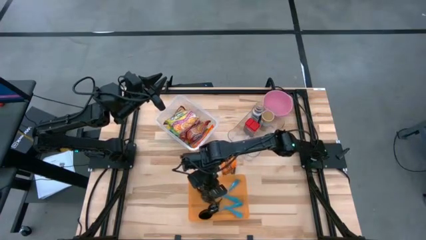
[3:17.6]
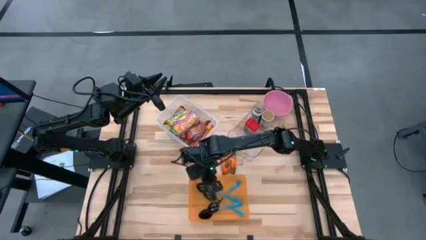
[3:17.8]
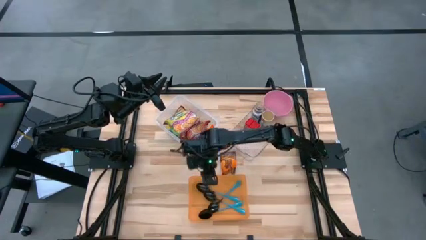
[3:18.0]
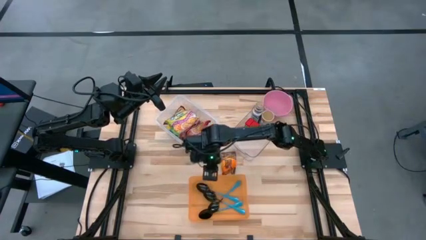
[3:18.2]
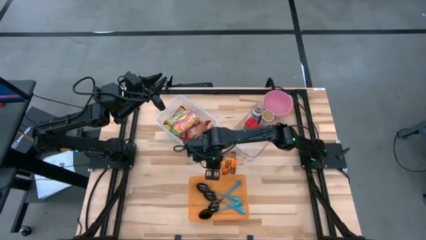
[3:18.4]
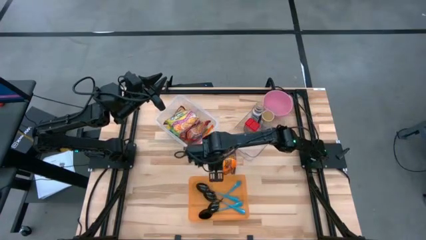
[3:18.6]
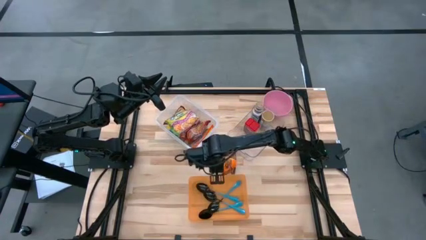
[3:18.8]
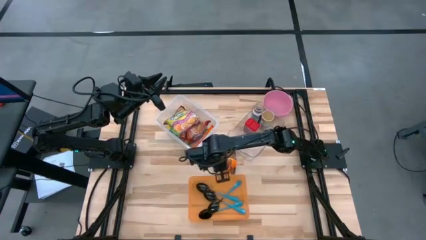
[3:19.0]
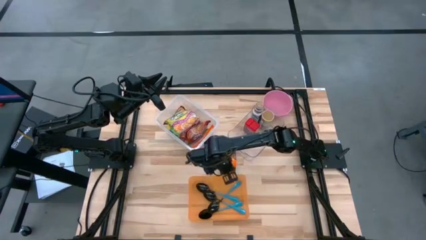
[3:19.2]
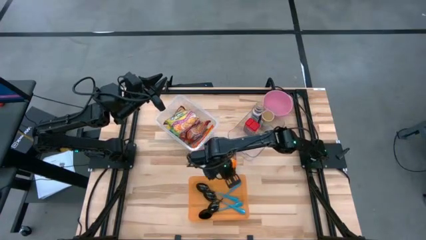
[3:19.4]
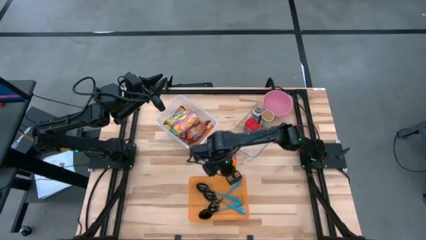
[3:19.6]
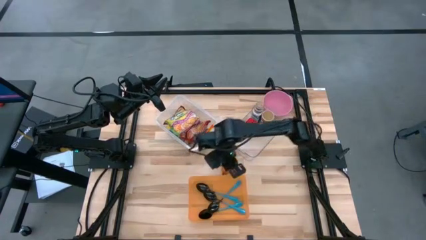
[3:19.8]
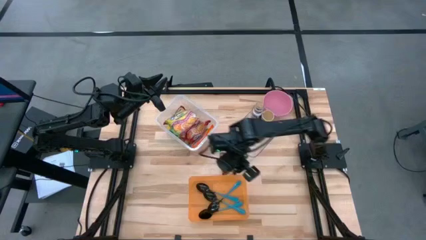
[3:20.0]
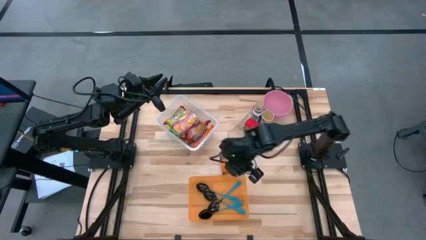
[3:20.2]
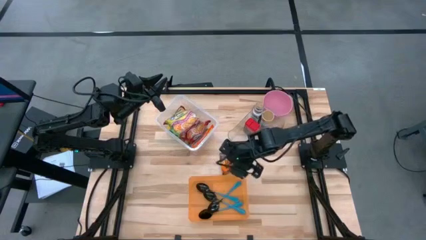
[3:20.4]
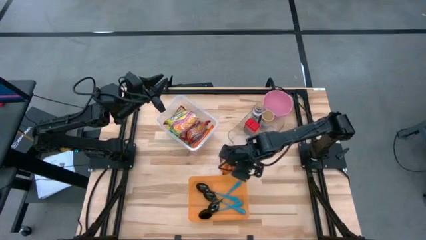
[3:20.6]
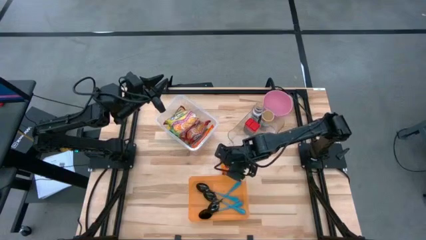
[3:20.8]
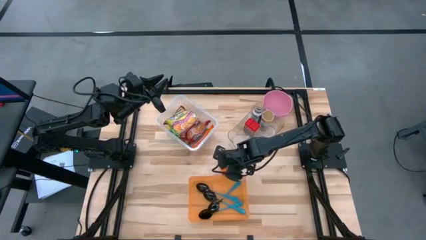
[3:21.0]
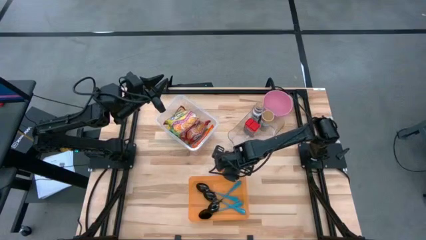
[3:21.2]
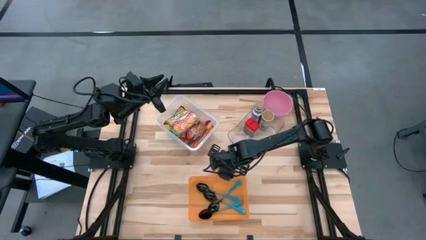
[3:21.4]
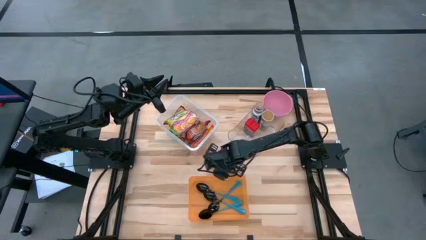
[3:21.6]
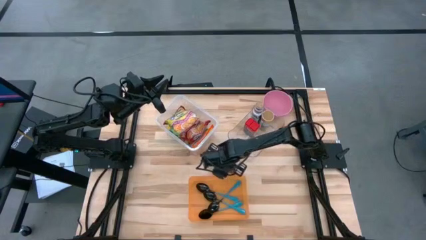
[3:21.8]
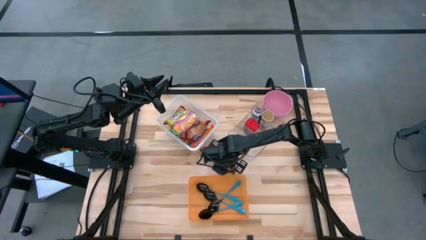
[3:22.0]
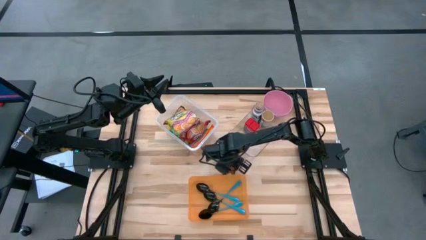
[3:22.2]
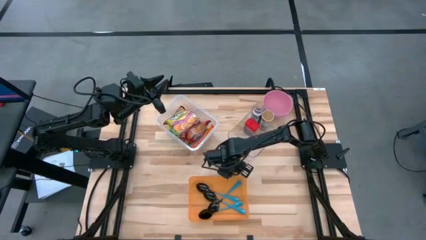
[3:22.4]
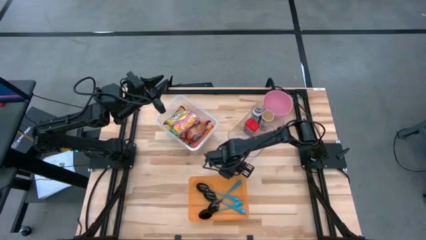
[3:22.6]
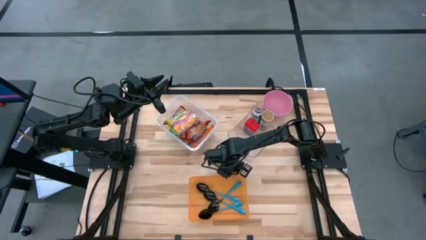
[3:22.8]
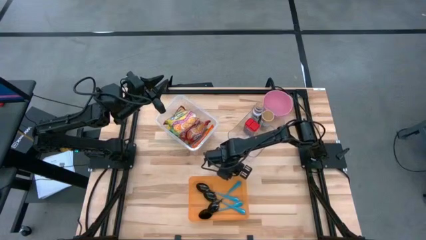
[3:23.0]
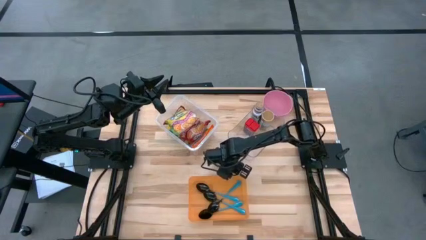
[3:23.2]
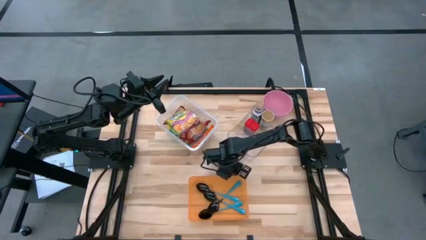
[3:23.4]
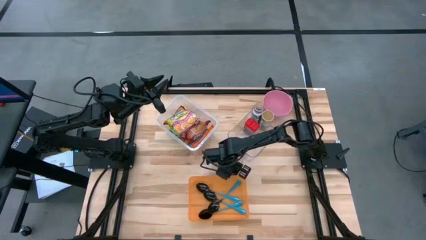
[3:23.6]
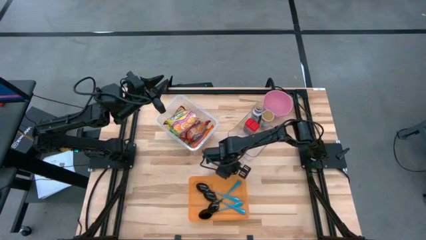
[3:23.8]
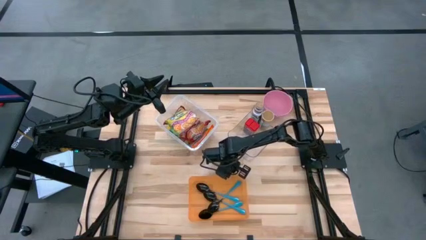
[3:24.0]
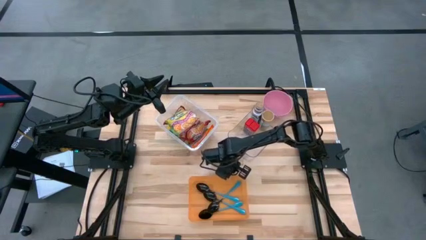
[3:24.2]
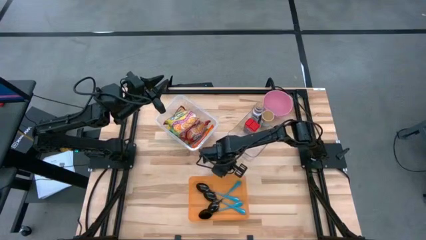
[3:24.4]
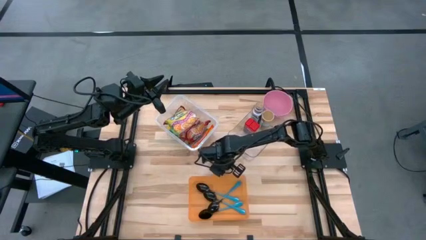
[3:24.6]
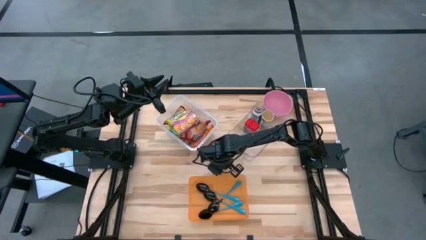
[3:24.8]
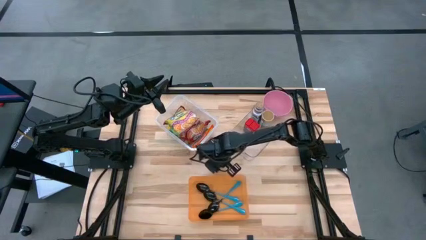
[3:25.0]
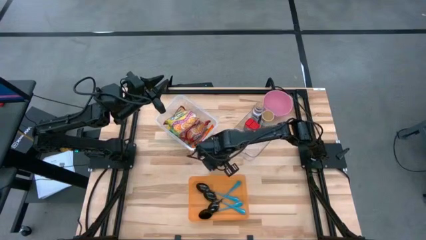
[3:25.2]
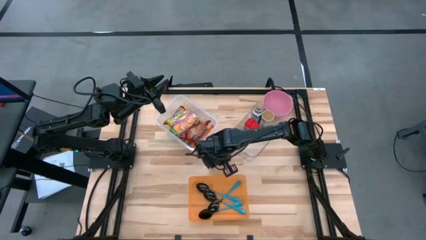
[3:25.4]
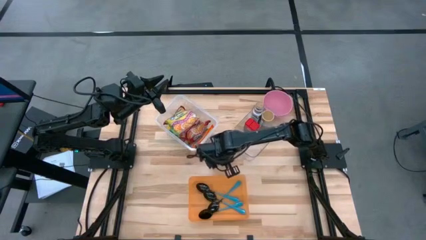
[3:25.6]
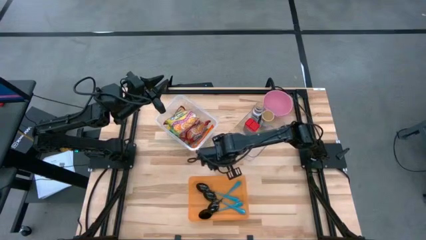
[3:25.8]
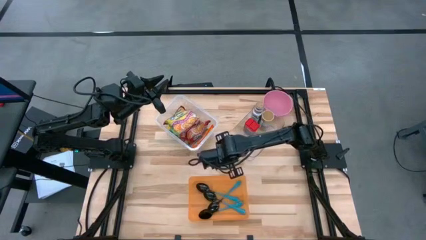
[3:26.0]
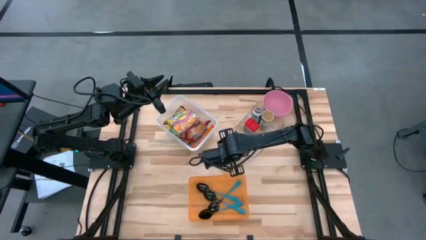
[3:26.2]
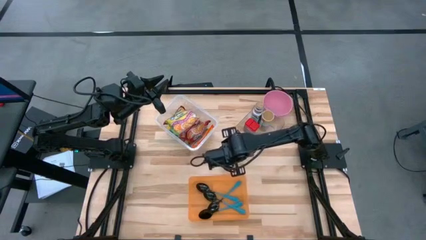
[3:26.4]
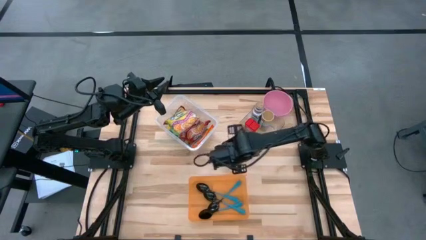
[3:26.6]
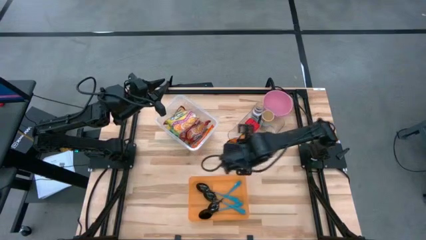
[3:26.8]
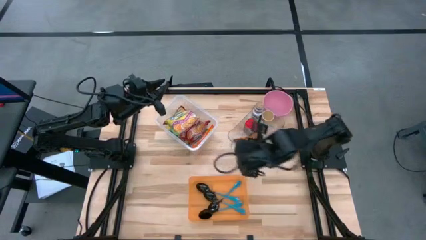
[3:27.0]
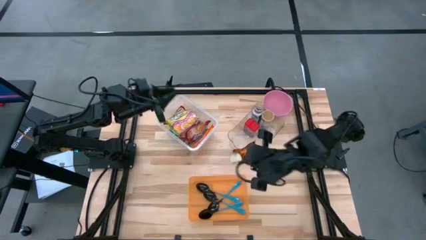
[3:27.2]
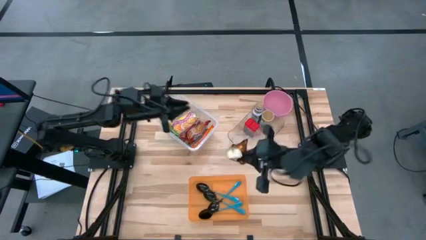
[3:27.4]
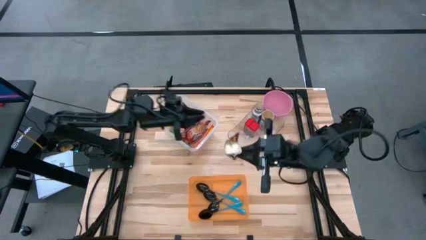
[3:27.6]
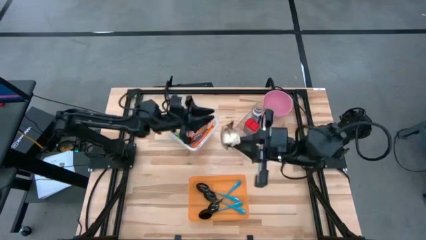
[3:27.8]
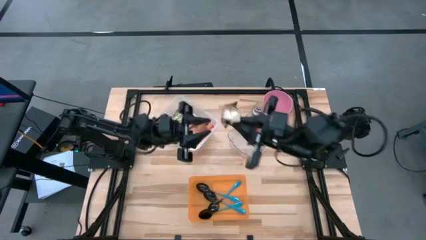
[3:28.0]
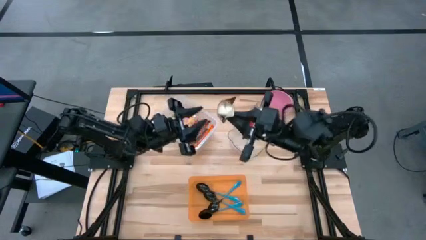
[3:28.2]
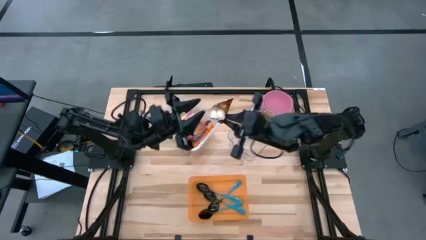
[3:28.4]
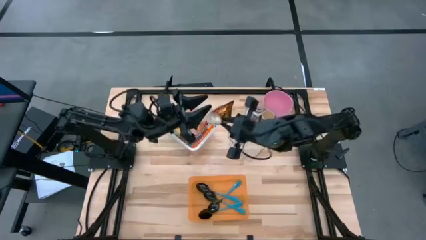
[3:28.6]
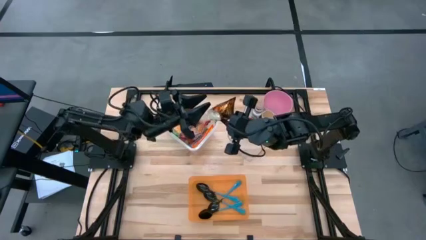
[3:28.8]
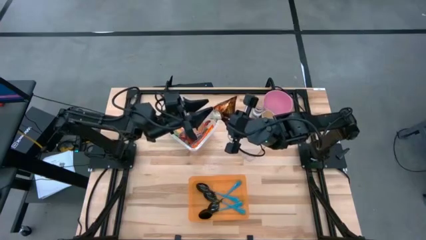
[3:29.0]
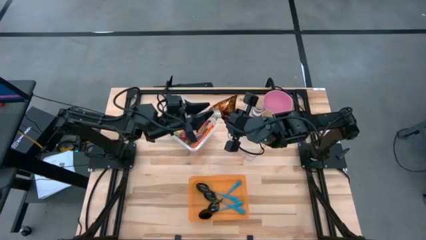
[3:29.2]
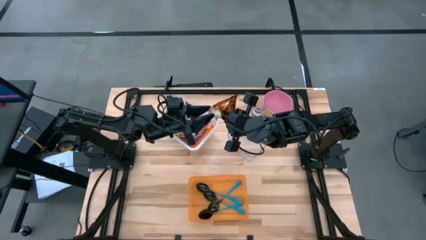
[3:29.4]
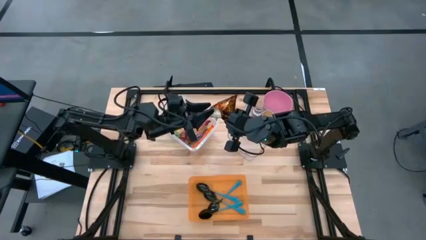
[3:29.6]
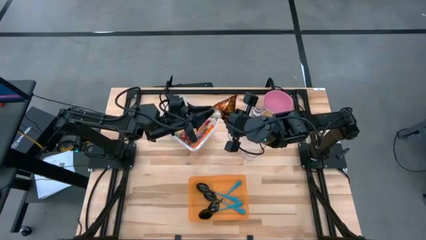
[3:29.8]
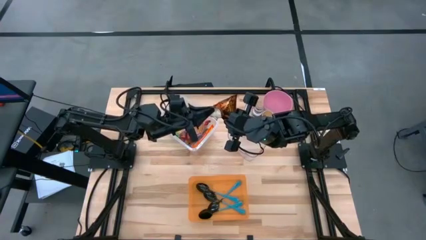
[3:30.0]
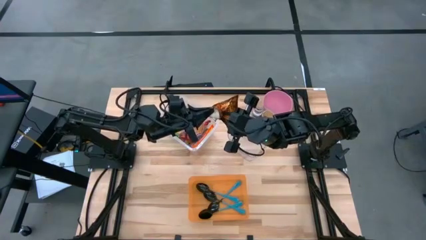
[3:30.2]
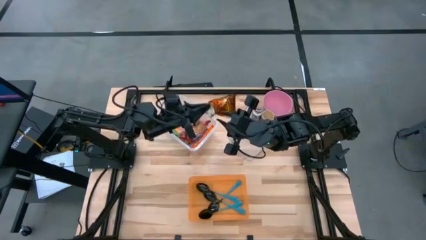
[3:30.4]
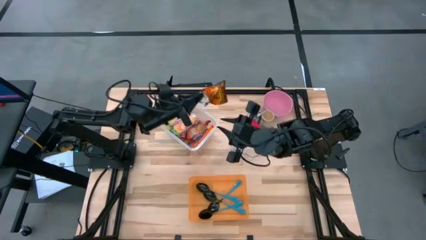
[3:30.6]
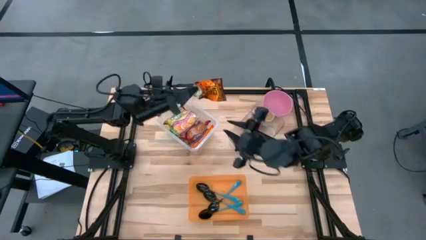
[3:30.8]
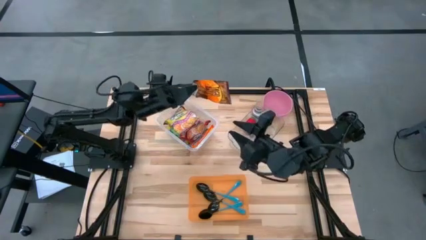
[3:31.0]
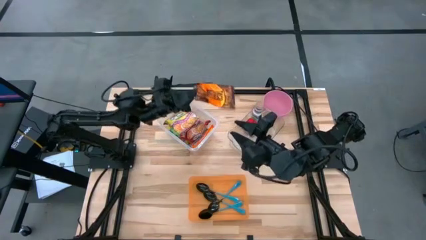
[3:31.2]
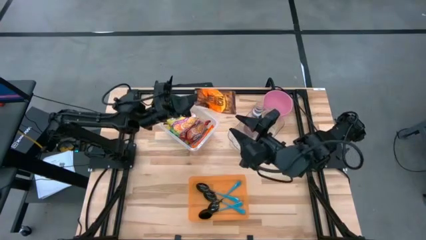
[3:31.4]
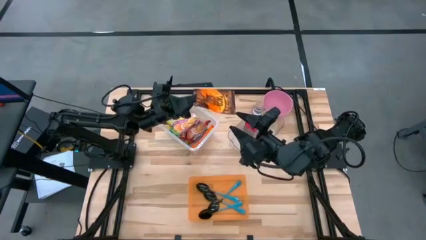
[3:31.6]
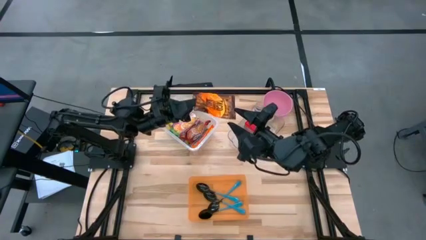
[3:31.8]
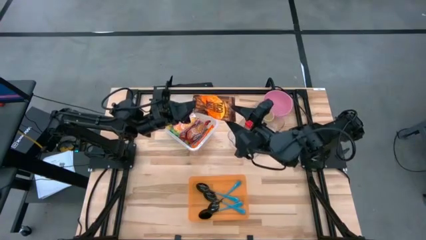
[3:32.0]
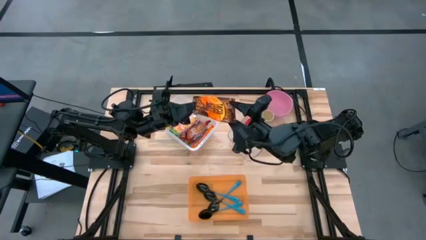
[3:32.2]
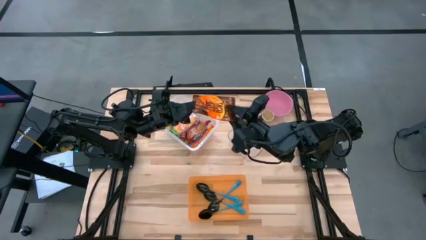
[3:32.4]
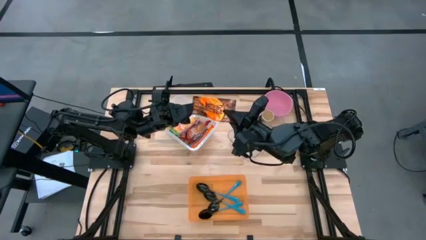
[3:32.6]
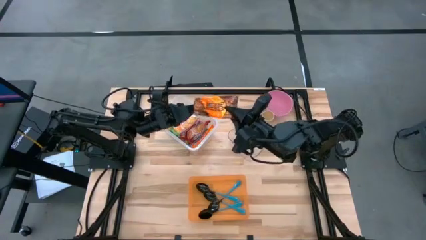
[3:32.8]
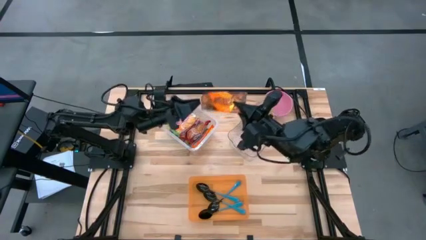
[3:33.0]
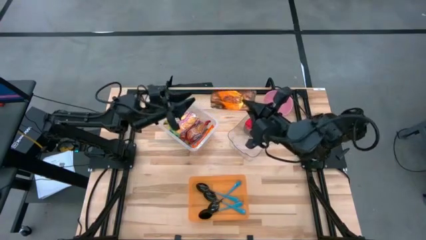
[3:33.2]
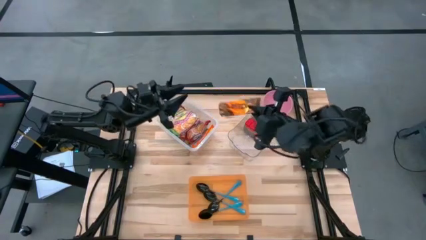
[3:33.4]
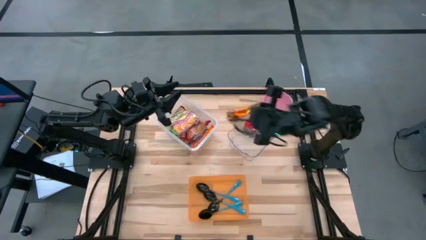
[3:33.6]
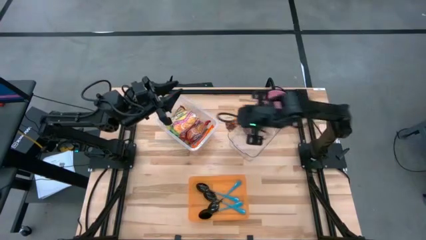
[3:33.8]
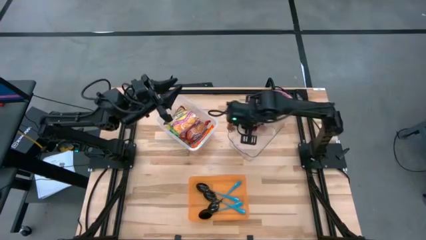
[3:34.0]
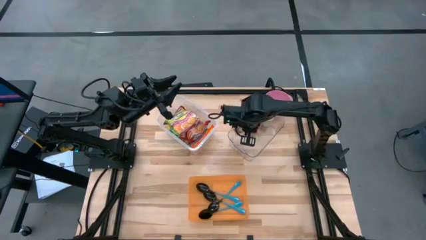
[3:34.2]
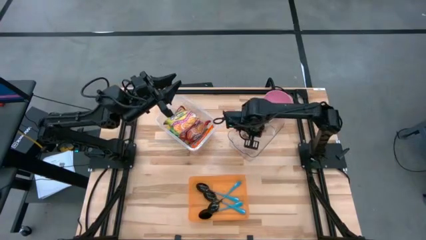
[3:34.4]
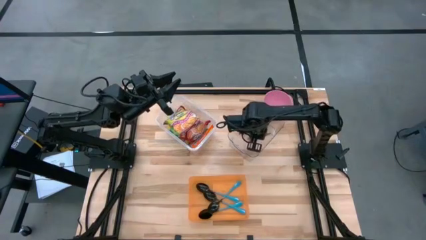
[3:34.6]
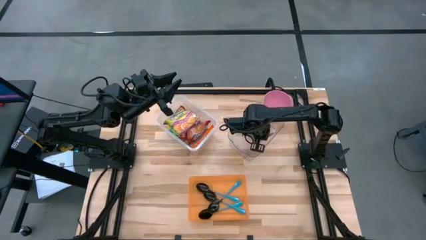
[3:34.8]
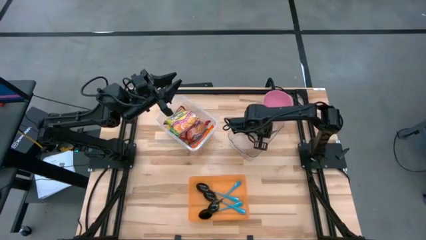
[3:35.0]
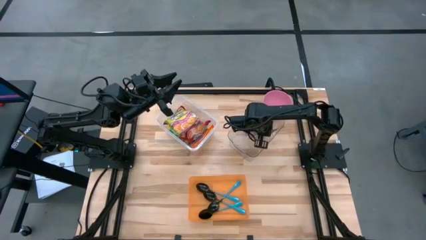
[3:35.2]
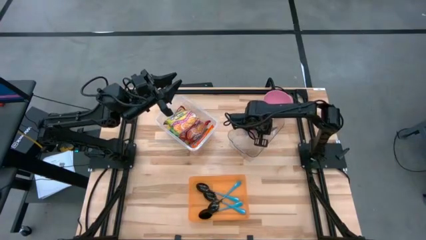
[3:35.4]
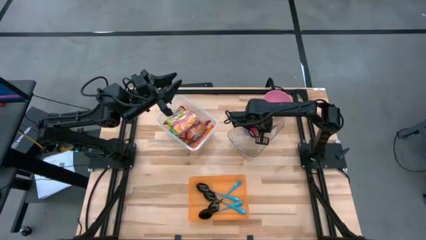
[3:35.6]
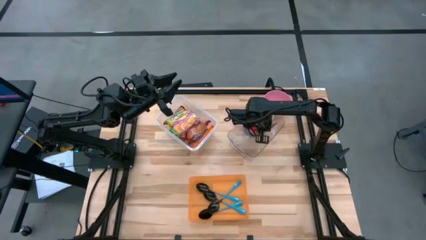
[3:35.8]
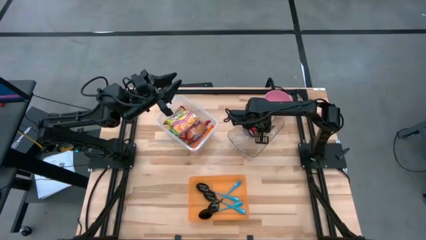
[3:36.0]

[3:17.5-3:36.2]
Task: Pick & Place Food Item
Put the orange seasoning pack into the transparent bin
